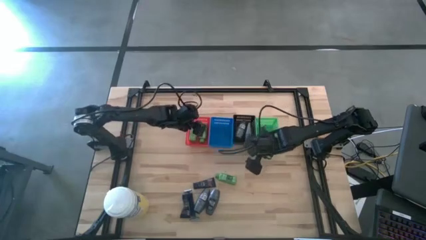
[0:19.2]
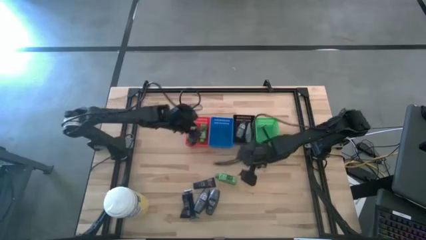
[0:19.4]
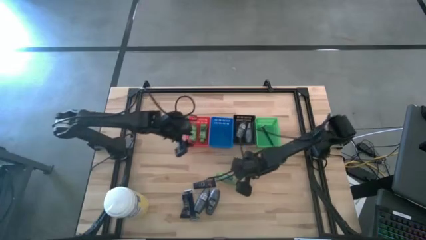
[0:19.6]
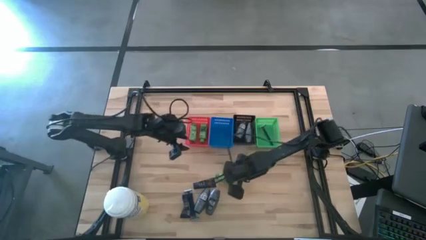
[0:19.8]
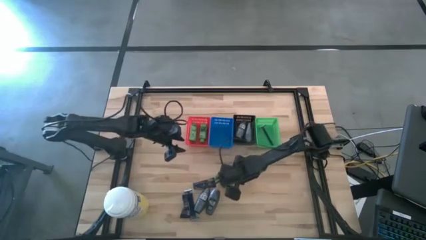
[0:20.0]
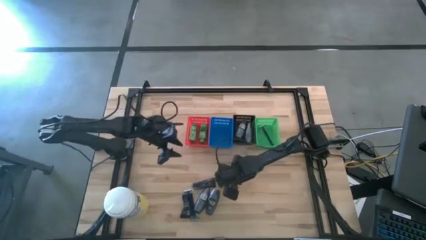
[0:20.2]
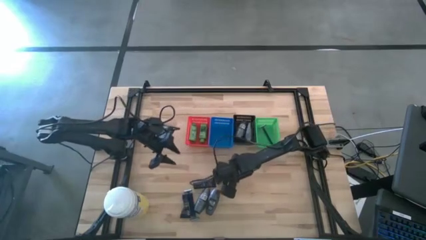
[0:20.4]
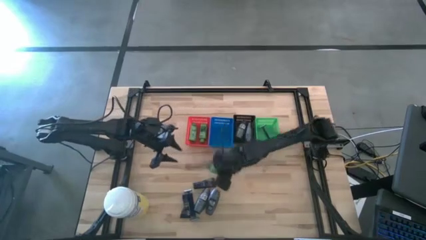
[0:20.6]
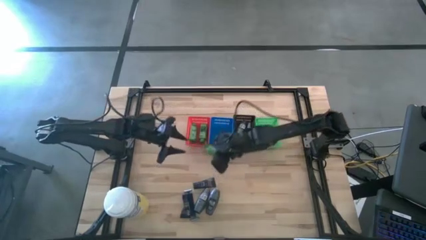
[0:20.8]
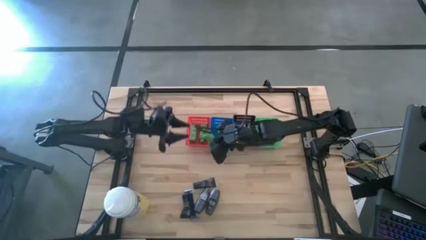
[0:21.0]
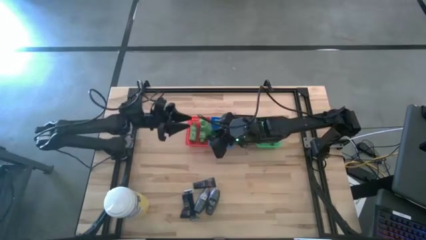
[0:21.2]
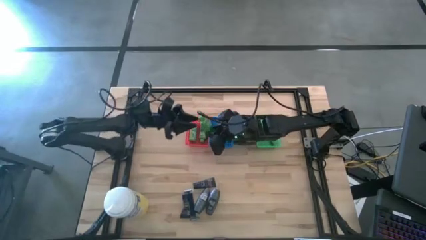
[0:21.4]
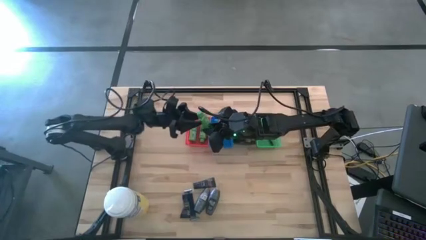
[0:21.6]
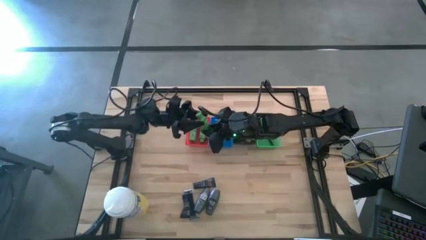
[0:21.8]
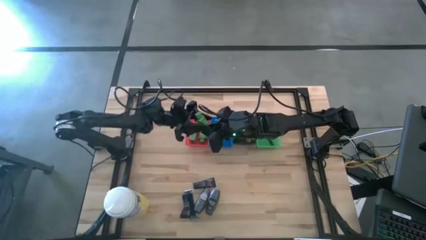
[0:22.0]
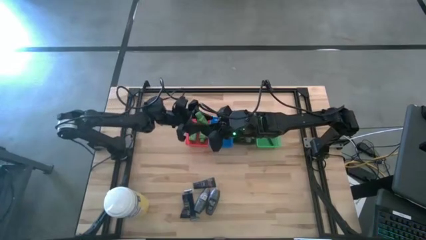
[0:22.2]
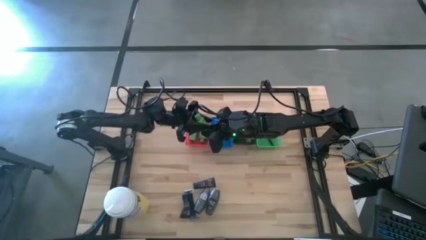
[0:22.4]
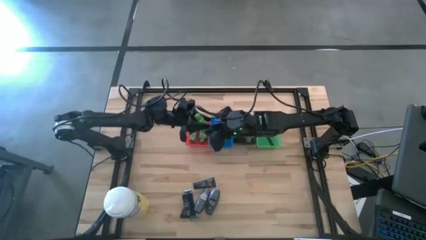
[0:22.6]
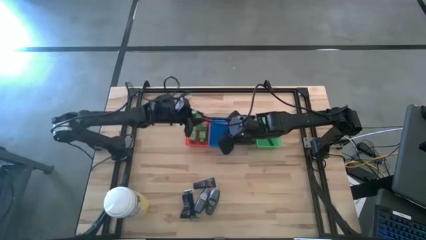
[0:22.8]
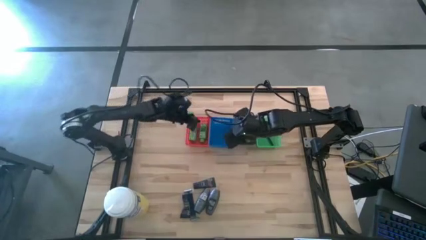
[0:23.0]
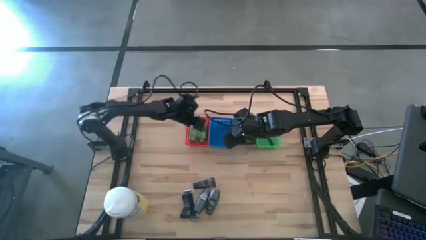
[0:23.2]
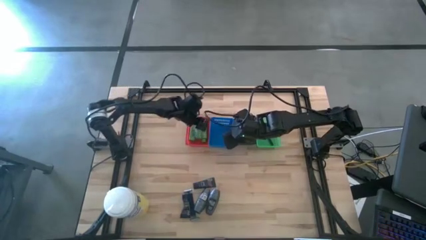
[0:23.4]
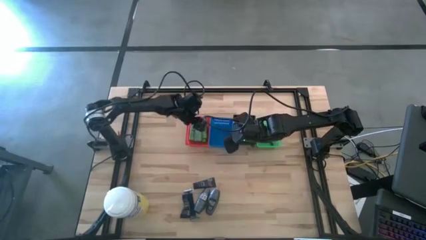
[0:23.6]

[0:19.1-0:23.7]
Task: Pick & Place Travel size toiletries
Put the green shampoo into the red bin

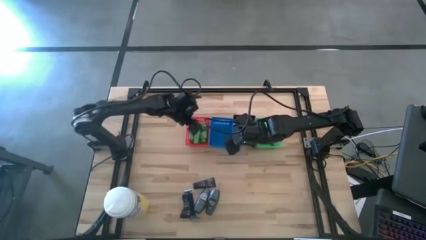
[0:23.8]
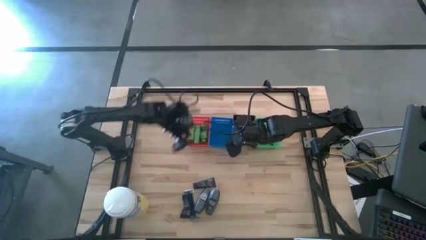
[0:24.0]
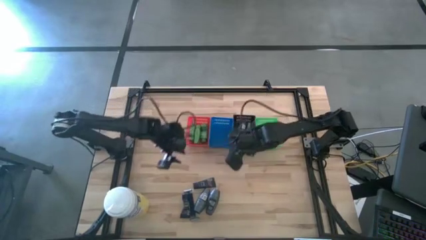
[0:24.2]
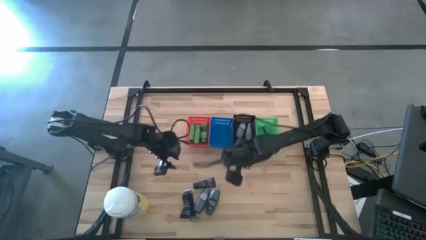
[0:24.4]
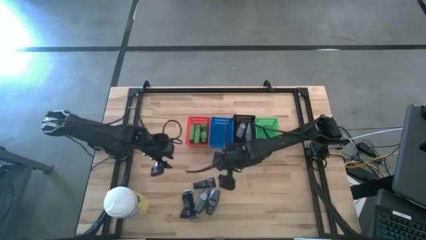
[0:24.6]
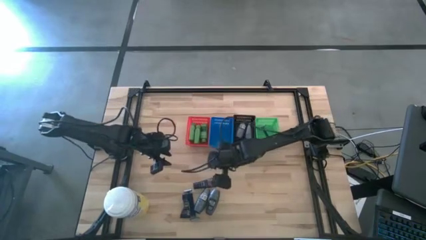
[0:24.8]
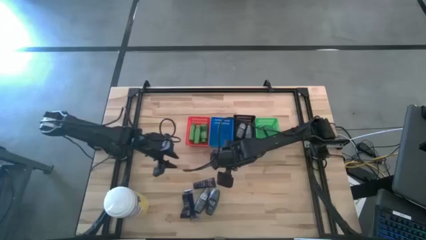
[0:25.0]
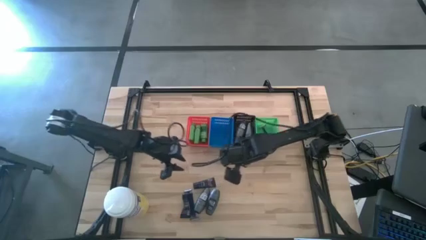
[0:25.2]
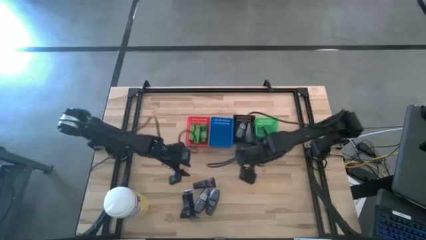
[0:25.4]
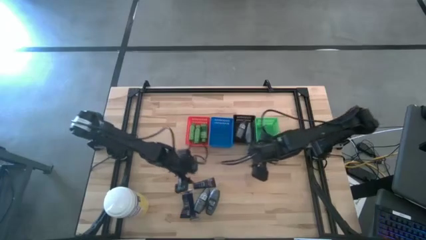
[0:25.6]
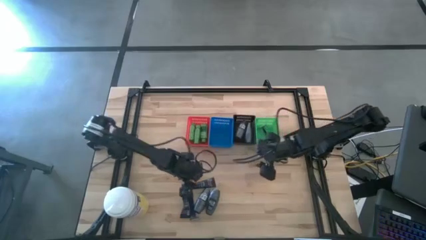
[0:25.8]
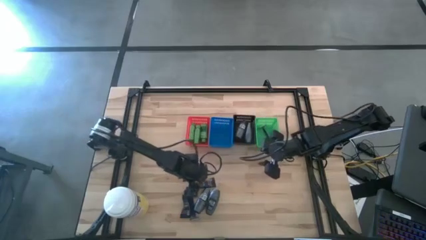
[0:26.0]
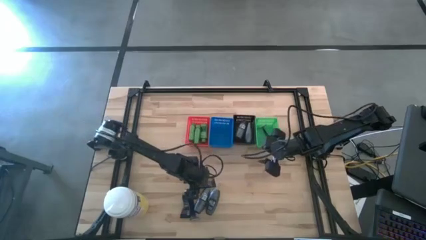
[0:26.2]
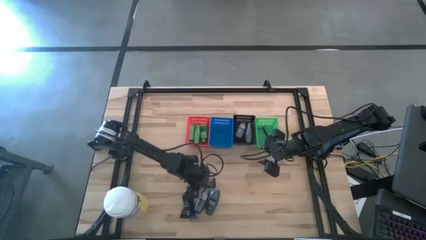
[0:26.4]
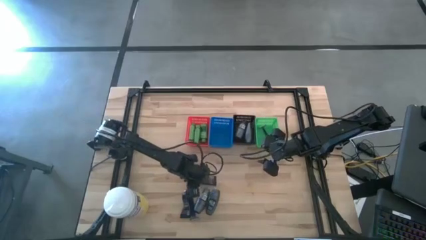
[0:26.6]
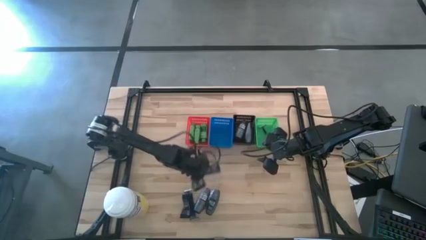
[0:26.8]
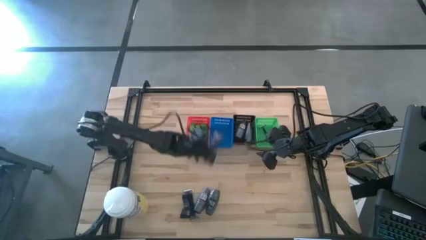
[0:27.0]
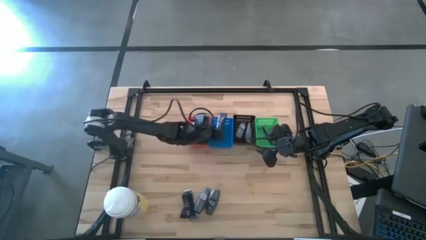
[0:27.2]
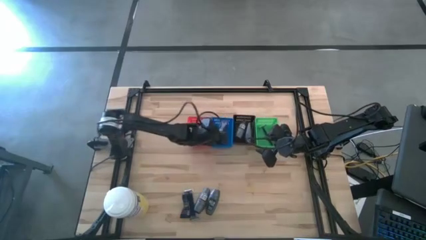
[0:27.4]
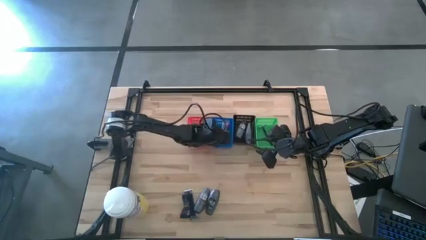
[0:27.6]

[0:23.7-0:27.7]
Put the blue shave cream into the blue bin

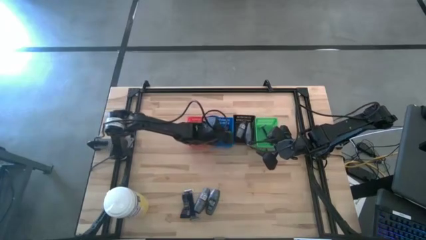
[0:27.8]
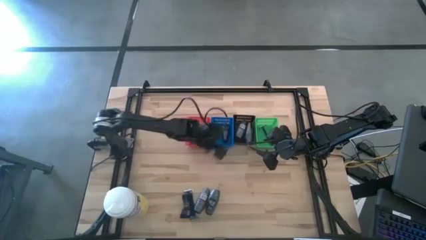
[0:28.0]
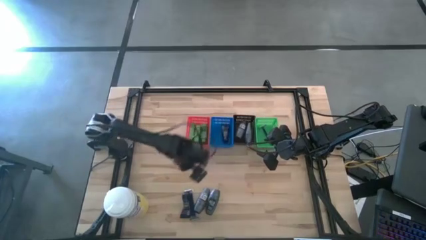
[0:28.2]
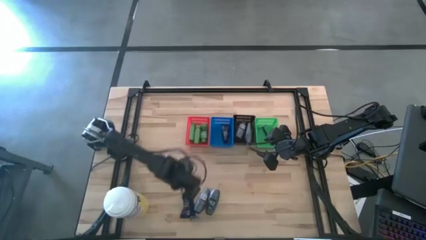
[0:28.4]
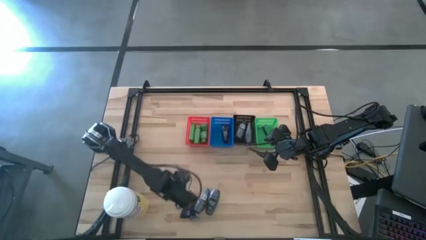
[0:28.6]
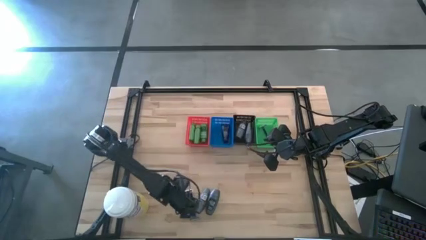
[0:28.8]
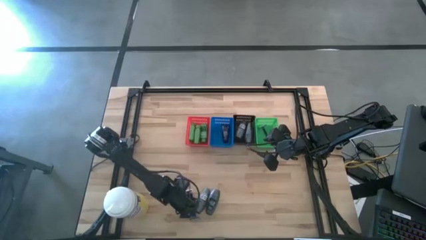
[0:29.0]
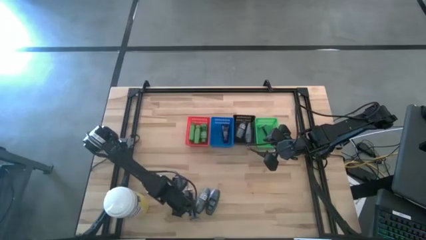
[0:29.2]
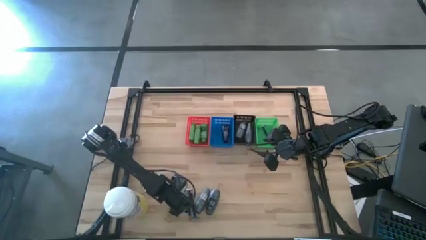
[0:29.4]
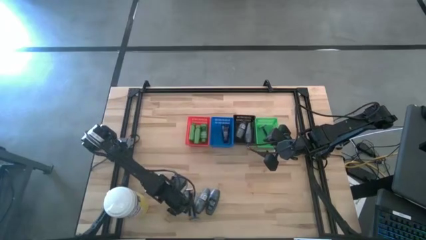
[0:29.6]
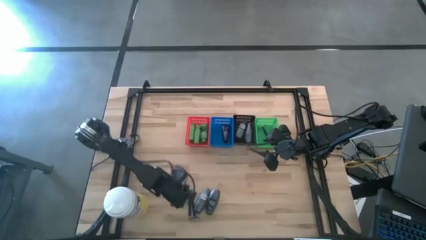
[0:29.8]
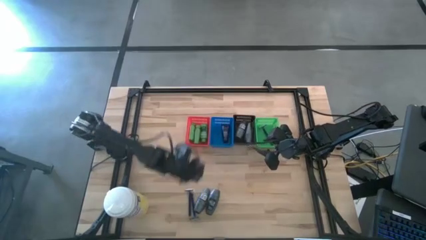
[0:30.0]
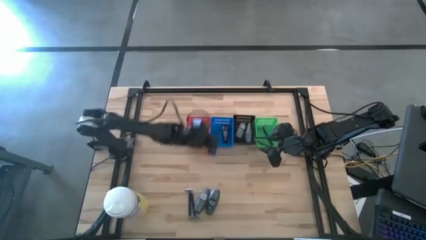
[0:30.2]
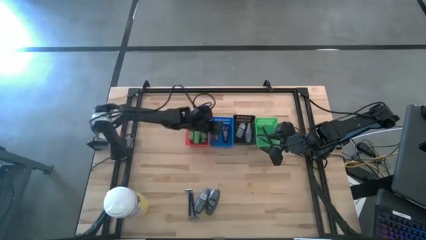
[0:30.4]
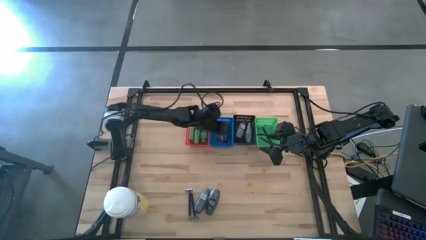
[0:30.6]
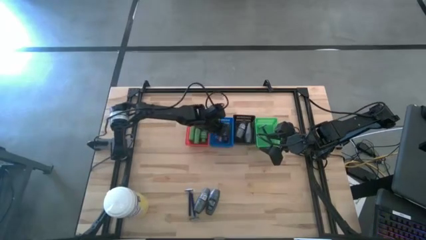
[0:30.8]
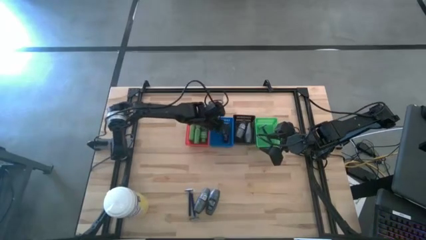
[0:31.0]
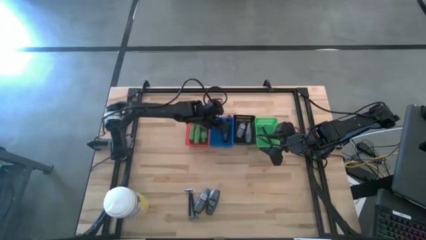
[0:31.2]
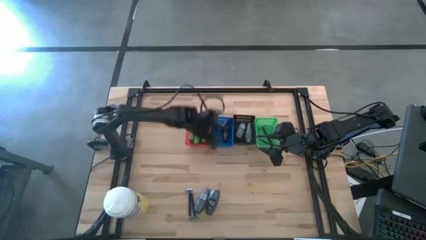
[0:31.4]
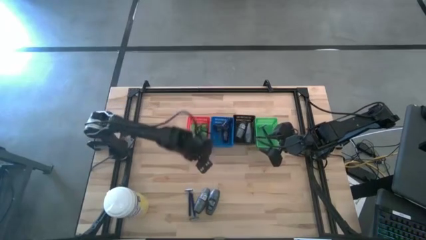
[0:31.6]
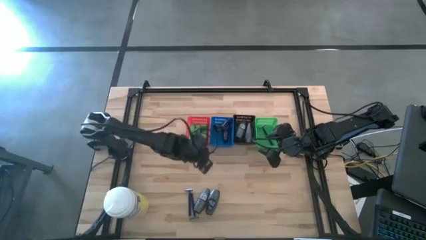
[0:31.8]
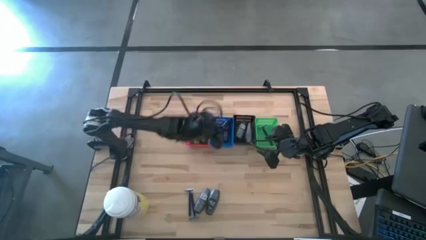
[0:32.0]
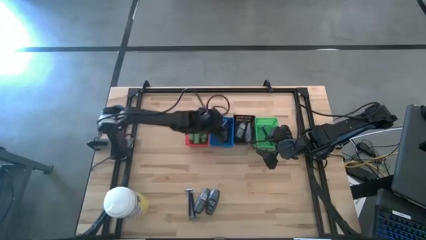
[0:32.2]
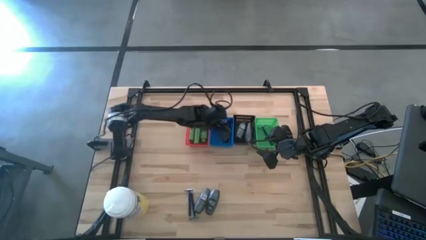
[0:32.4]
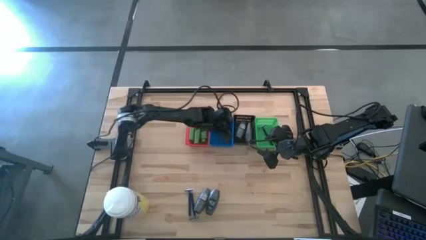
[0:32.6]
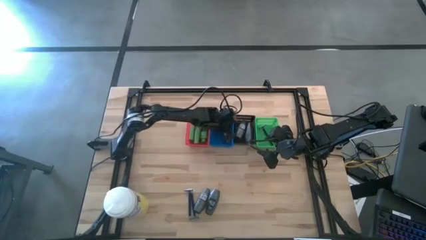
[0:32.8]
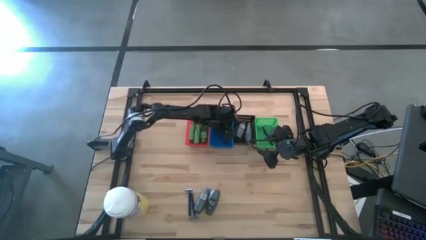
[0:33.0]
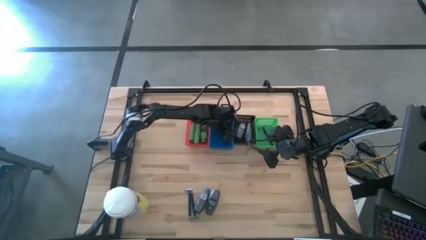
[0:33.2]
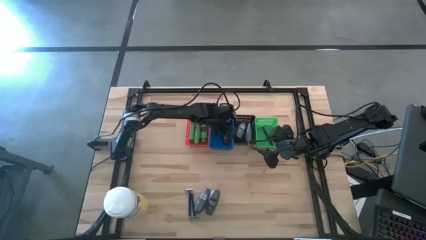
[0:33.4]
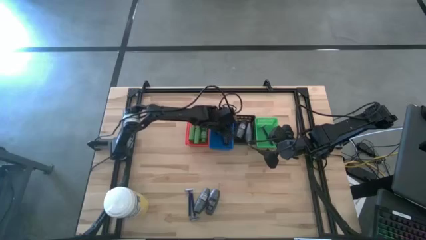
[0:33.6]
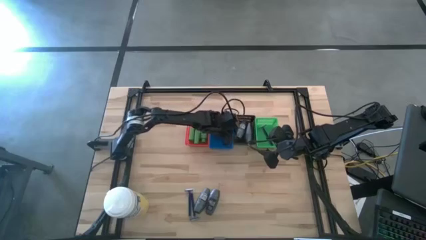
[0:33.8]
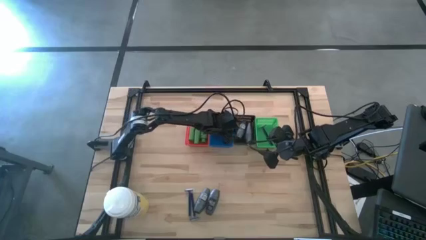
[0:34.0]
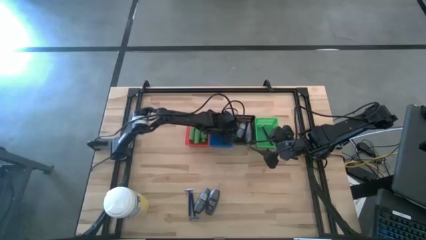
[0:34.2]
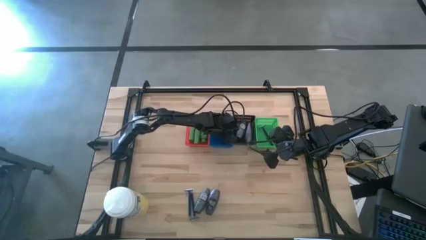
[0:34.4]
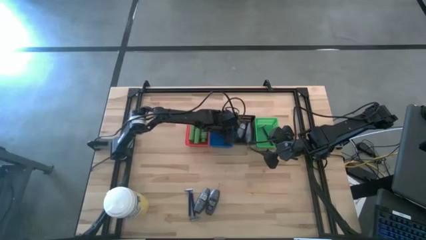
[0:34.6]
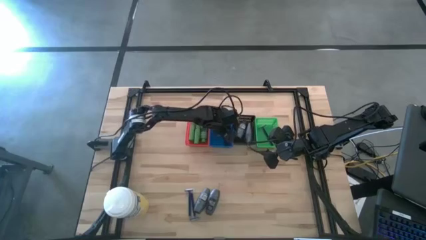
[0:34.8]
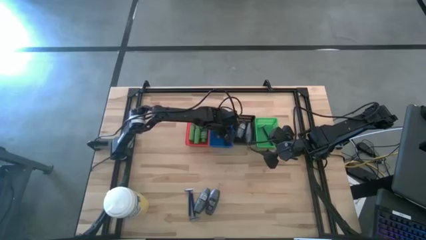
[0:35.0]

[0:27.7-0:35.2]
Put the blue shave cream into the blue bin
